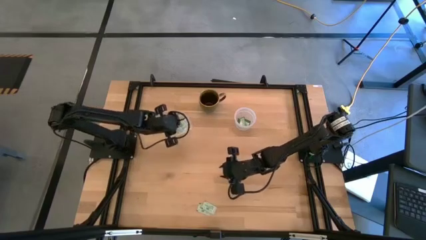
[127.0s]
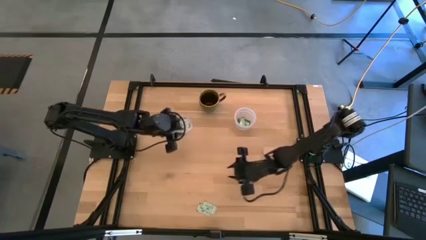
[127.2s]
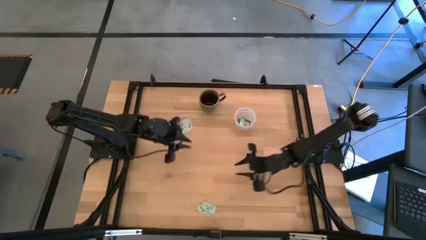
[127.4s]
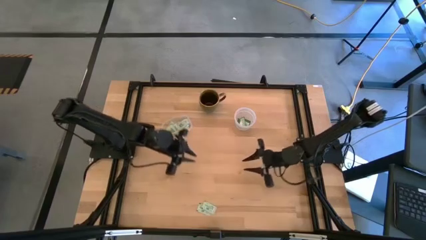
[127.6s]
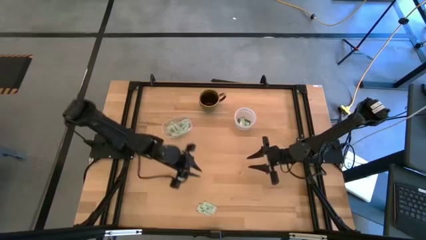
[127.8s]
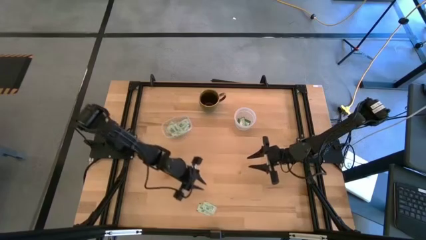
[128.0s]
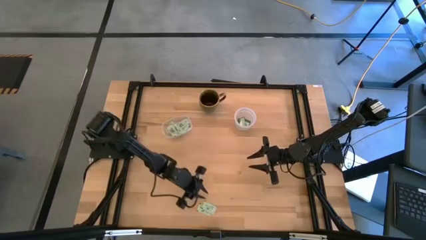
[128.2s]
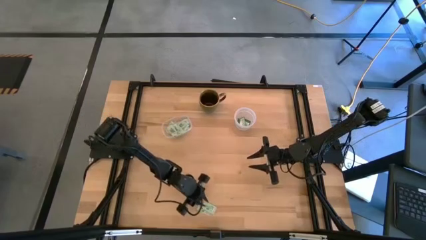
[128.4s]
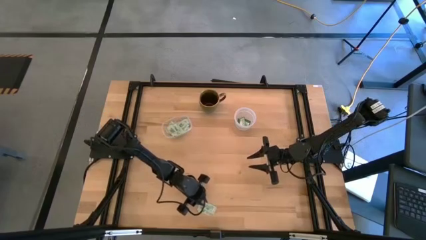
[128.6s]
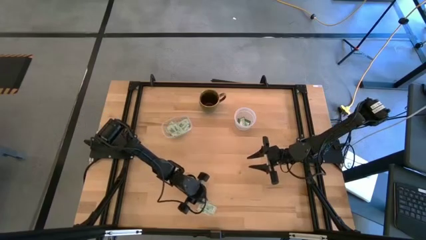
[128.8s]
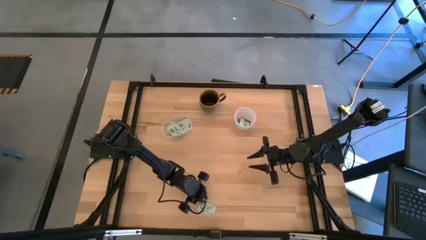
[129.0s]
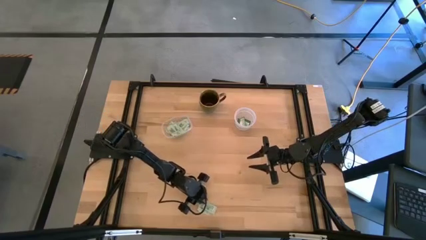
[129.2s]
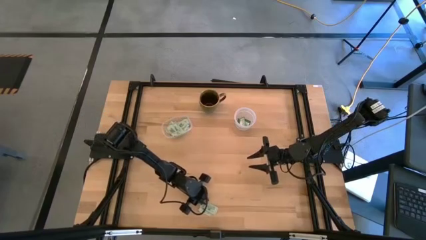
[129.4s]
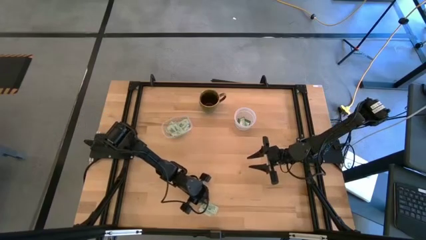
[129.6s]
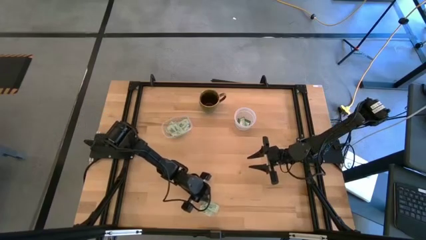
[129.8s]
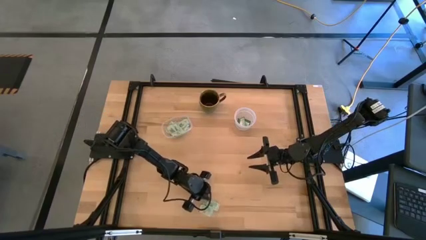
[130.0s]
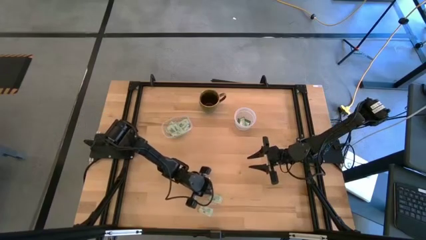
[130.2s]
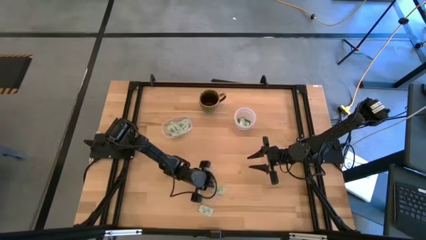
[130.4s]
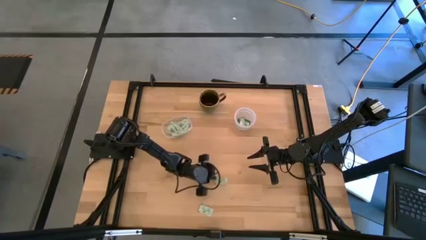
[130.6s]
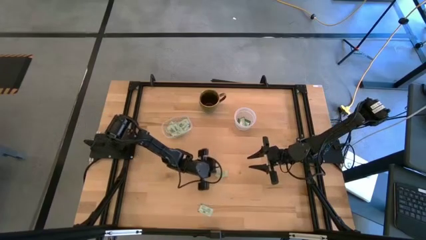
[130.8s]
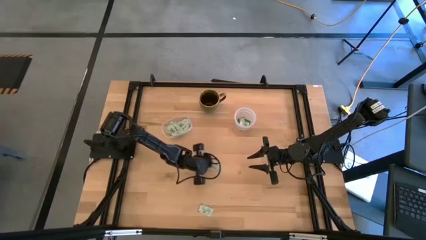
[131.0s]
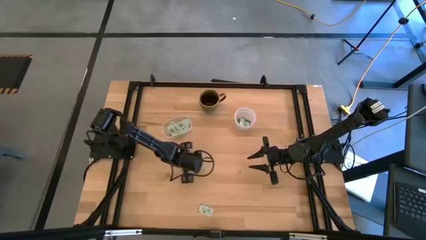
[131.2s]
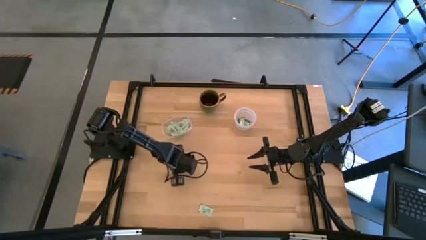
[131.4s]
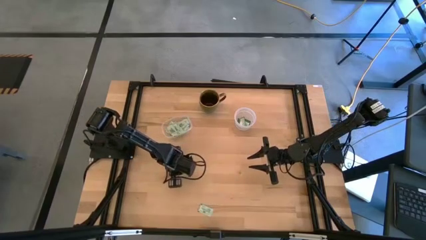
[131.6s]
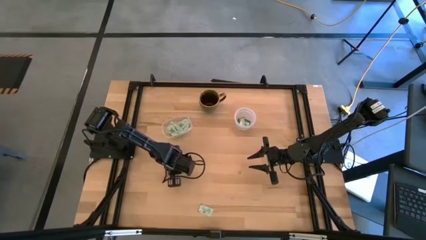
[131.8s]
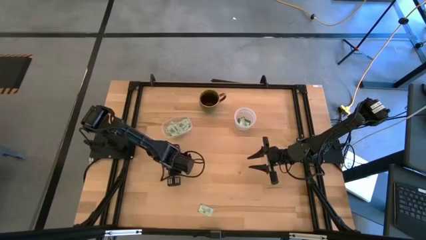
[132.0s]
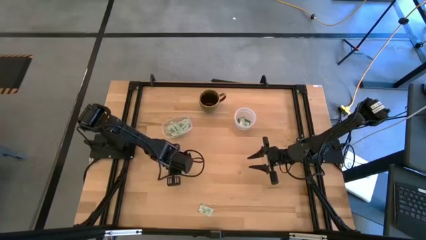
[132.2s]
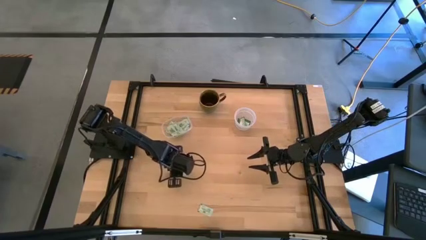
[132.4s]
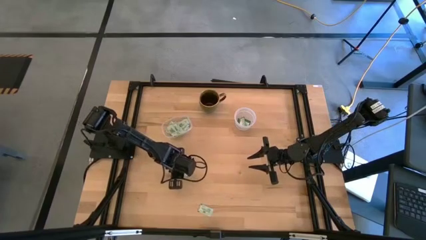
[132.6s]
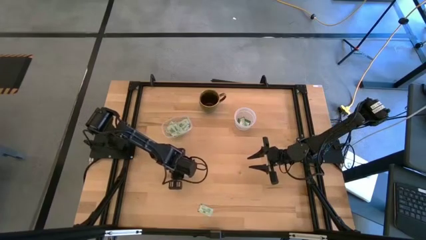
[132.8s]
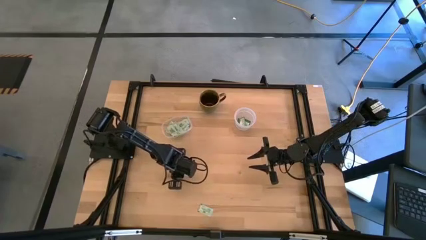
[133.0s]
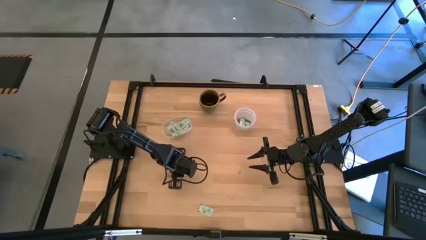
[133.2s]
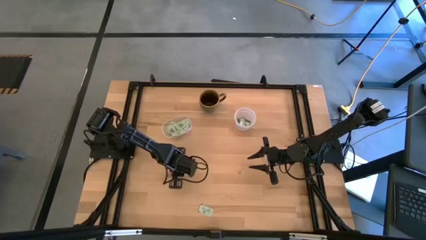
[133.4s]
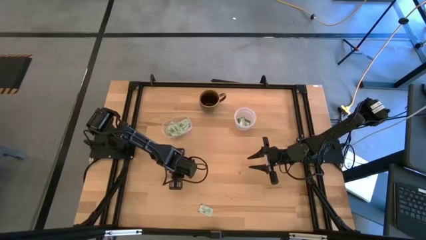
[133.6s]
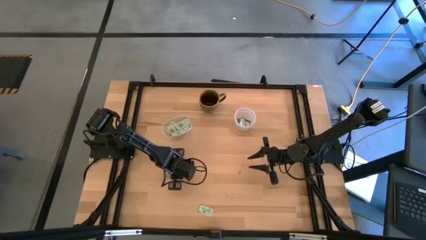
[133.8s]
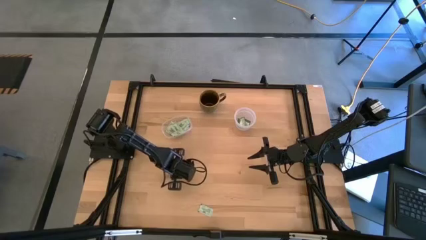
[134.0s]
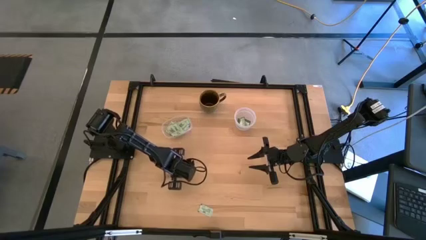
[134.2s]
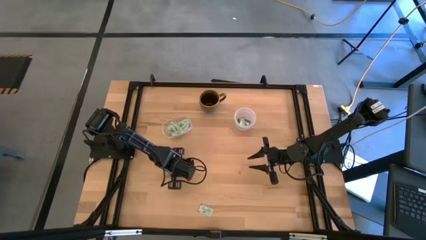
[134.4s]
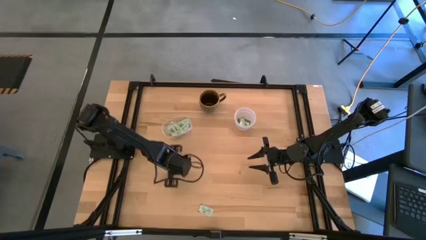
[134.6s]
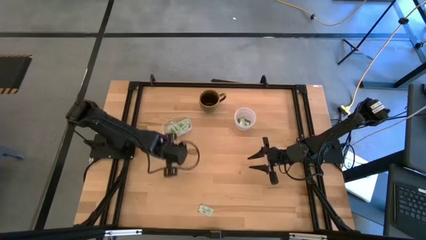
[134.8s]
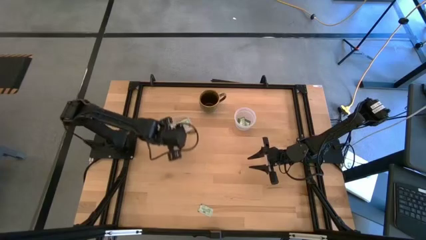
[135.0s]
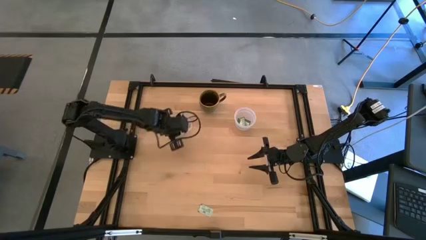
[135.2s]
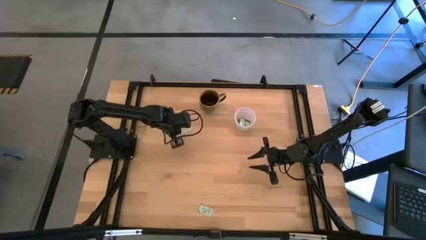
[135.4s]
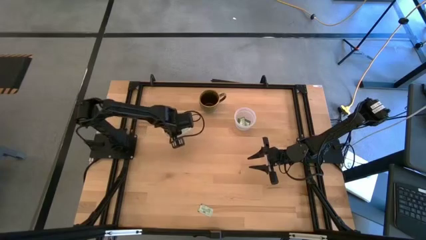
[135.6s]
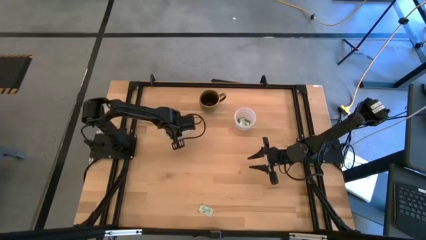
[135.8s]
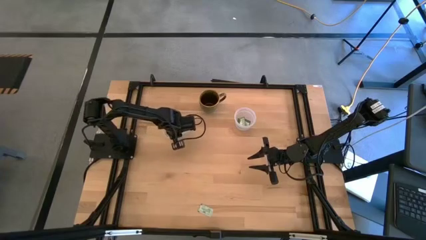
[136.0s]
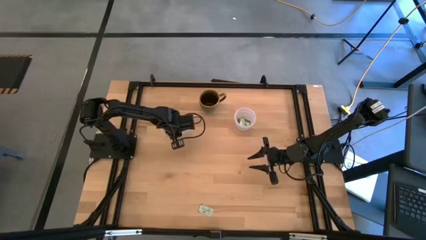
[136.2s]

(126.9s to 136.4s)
Task: Pick and place Stevia / Truvia into bins
Put the light green stevia packet into the left transparent container

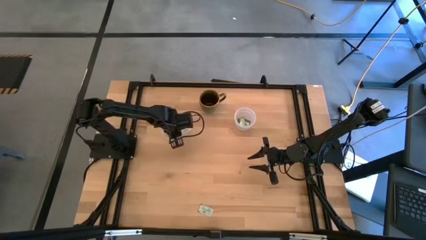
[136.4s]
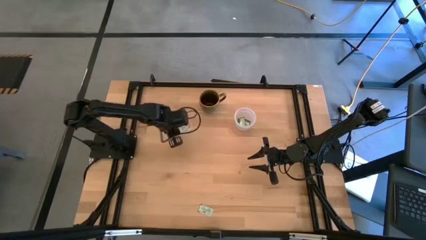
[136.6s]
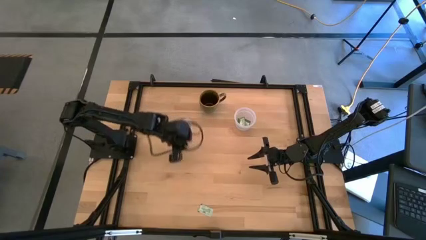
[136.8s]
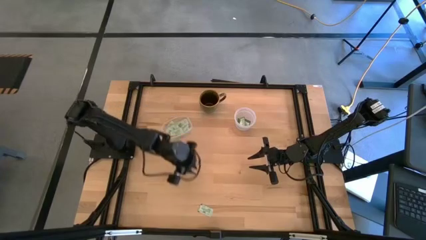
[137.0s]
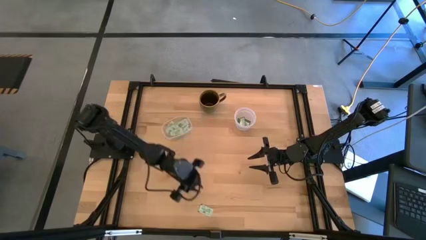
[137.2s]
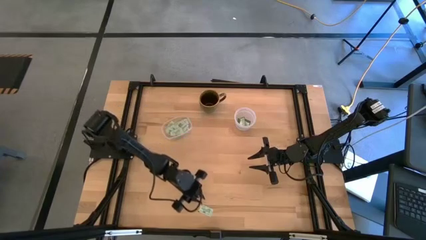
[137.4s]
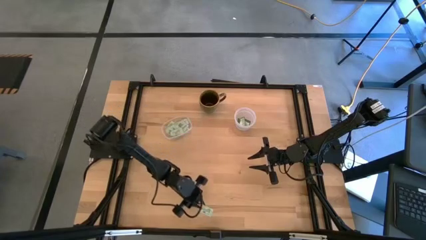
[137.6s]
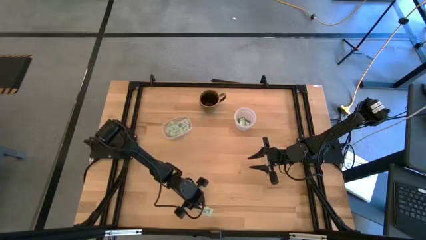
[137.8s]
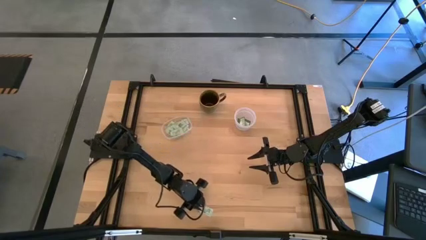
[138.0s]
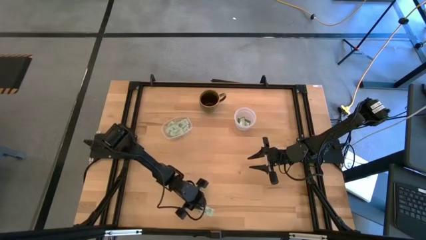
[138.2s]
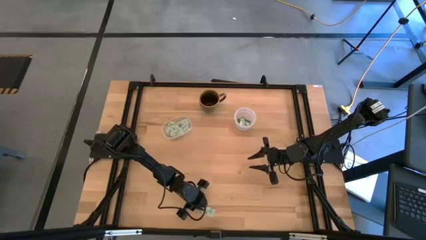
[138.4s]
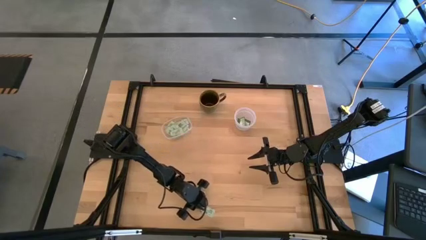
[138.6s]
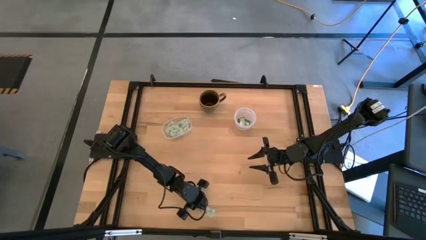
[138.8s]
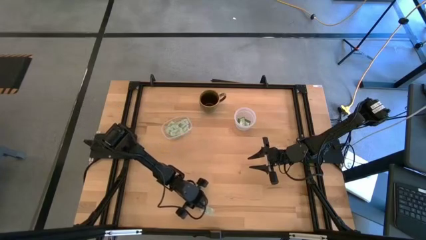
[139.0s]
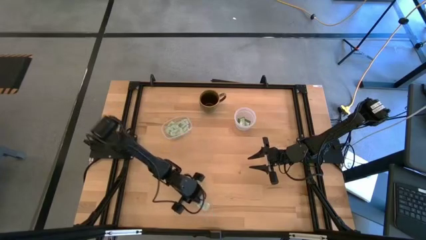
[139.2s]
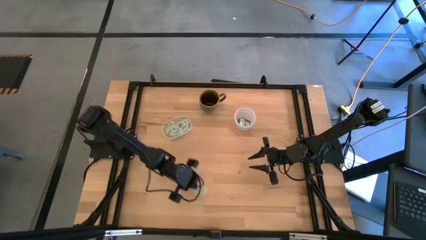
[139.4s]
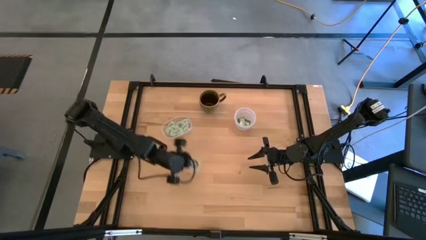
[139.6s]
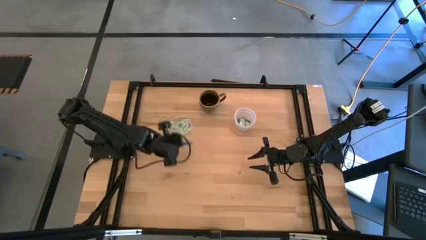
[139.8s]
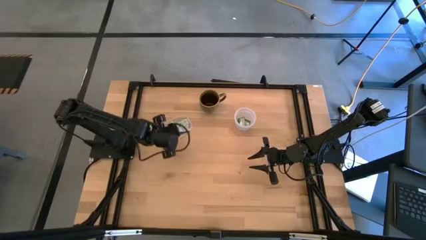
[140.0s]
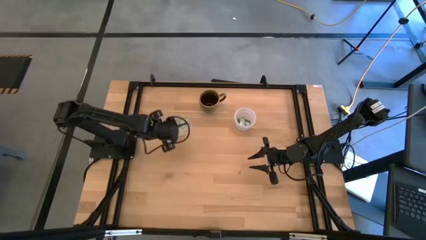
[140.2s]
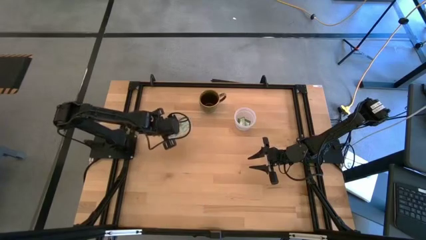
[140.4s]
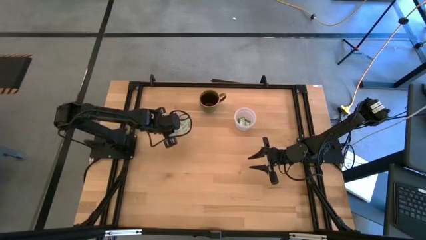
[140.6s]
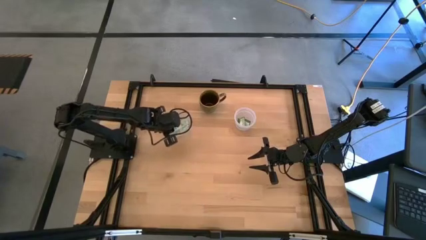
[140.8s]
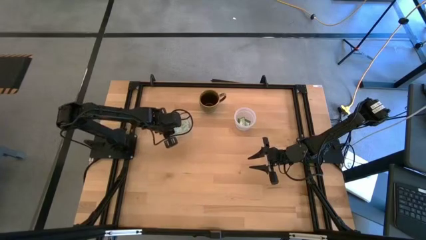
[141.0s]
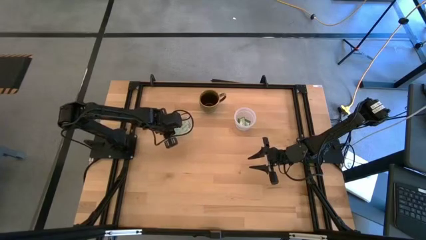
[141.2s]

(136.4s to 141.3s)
Put the light green stevia packet into the left transparent container
